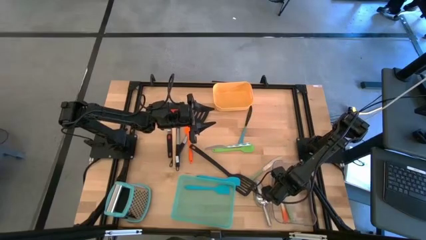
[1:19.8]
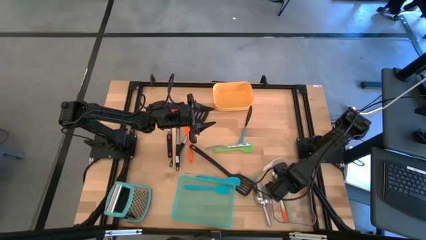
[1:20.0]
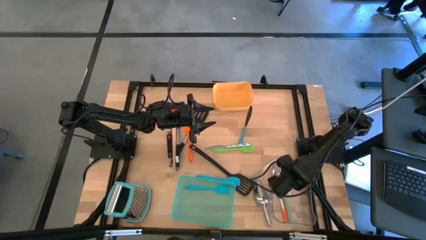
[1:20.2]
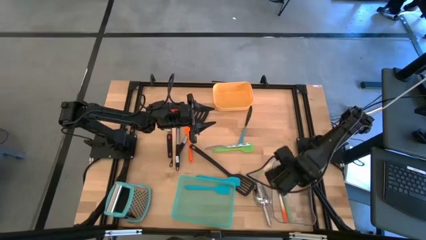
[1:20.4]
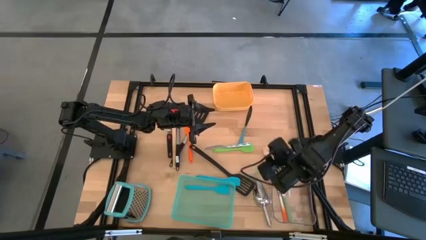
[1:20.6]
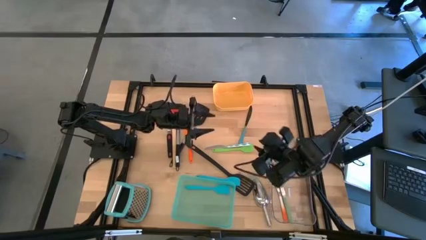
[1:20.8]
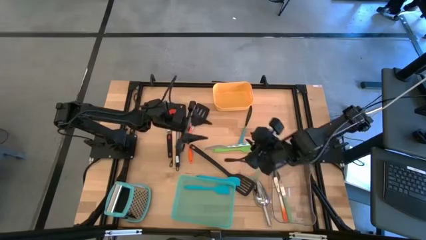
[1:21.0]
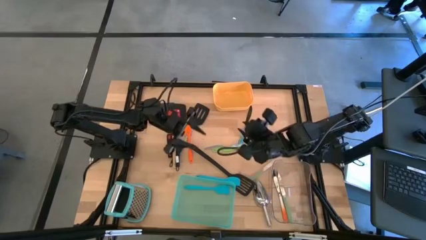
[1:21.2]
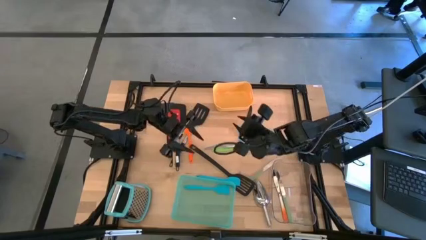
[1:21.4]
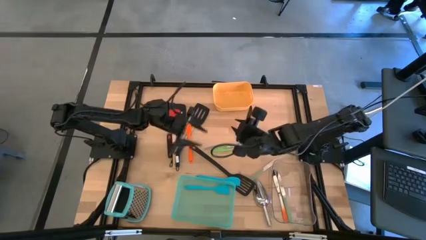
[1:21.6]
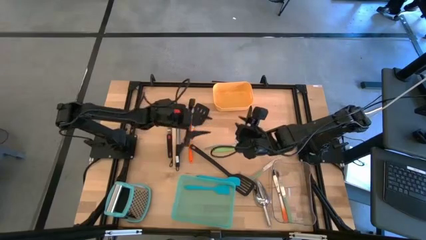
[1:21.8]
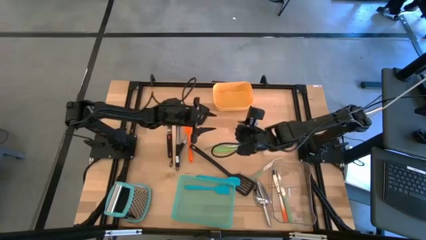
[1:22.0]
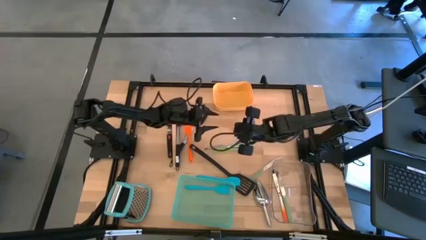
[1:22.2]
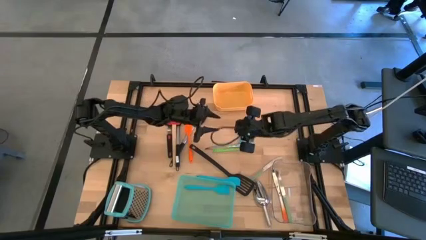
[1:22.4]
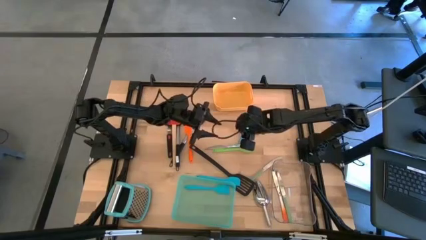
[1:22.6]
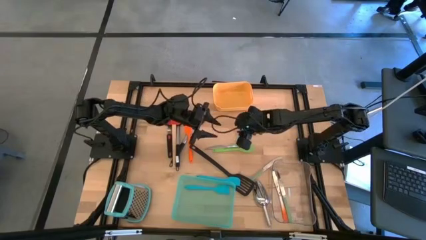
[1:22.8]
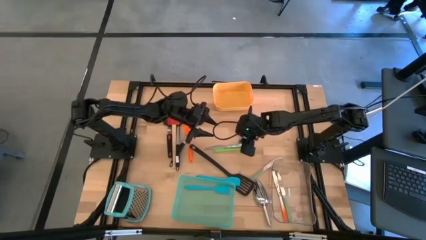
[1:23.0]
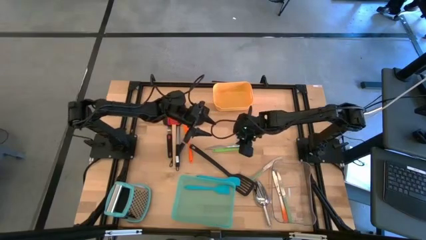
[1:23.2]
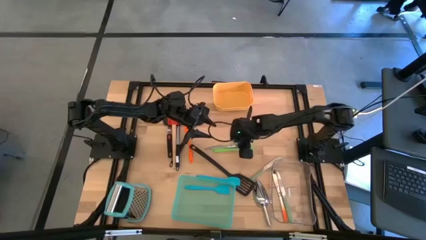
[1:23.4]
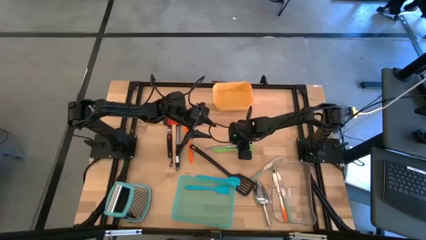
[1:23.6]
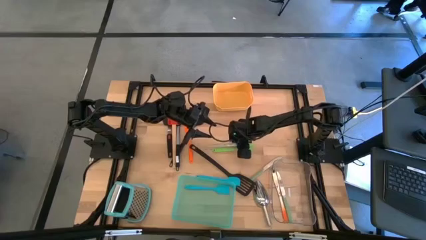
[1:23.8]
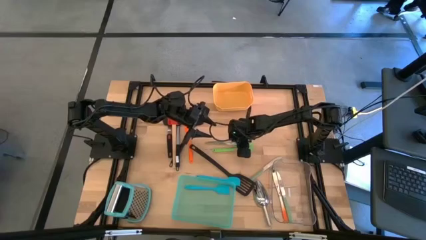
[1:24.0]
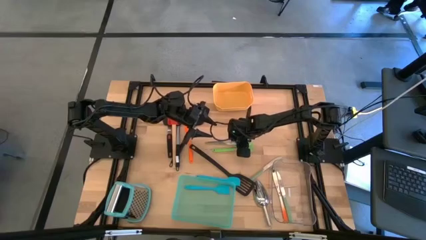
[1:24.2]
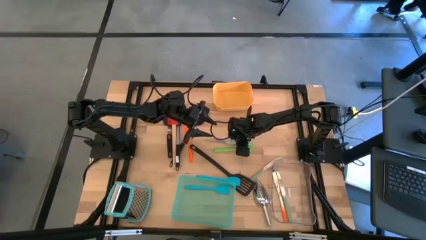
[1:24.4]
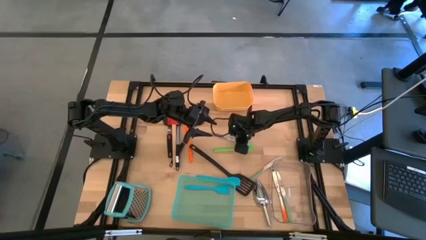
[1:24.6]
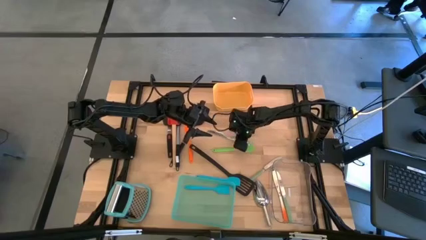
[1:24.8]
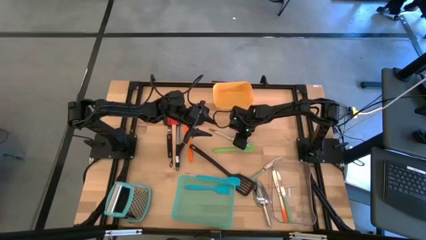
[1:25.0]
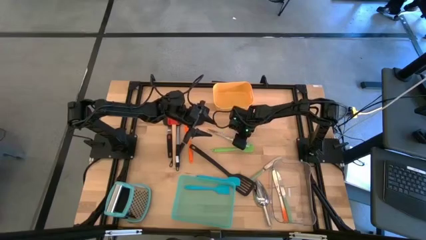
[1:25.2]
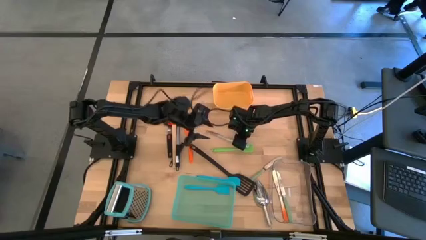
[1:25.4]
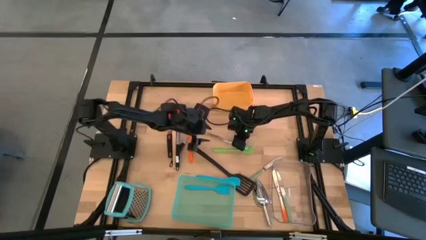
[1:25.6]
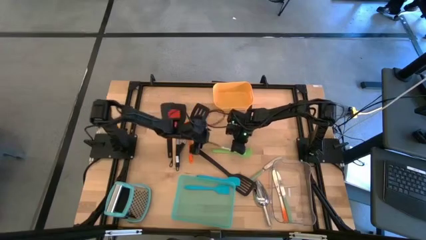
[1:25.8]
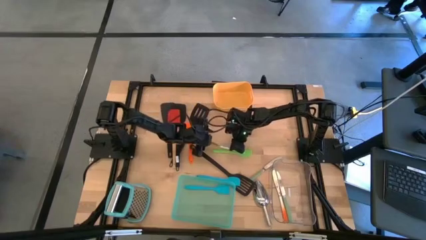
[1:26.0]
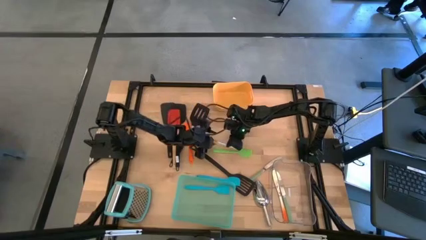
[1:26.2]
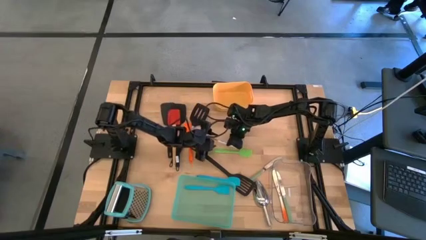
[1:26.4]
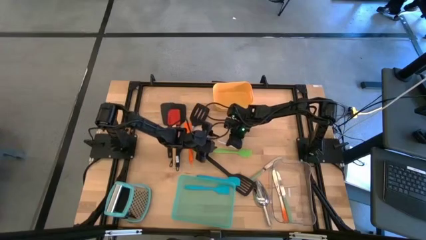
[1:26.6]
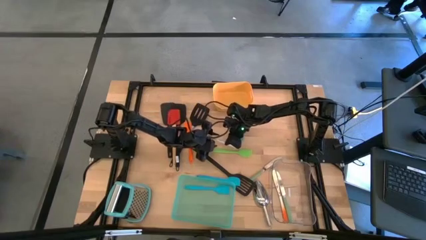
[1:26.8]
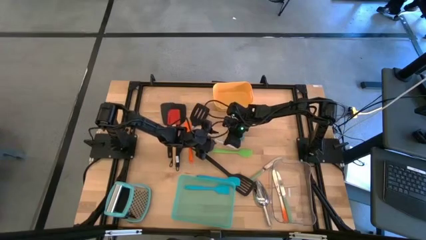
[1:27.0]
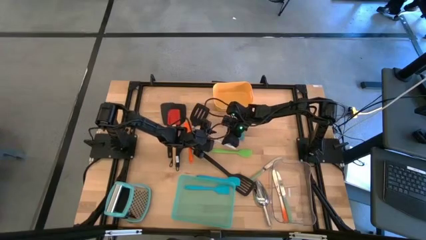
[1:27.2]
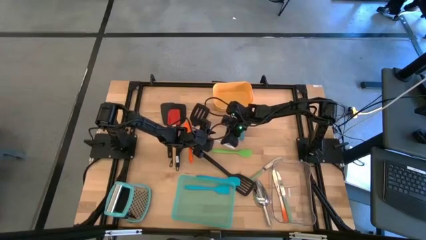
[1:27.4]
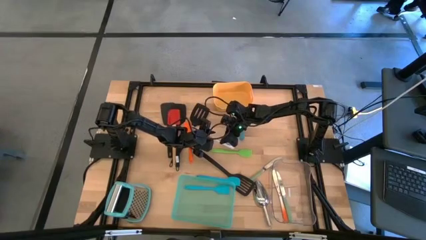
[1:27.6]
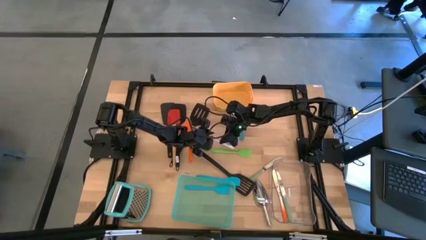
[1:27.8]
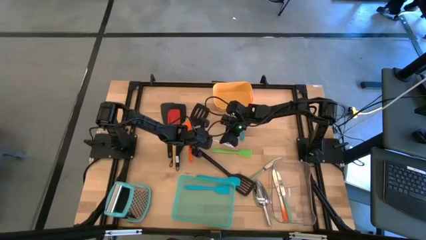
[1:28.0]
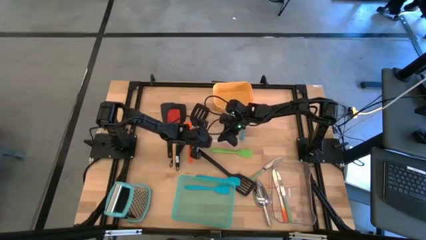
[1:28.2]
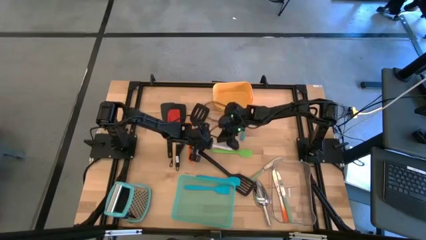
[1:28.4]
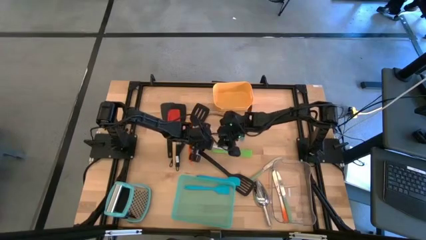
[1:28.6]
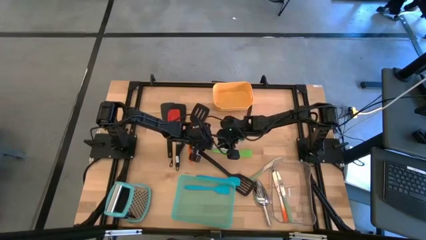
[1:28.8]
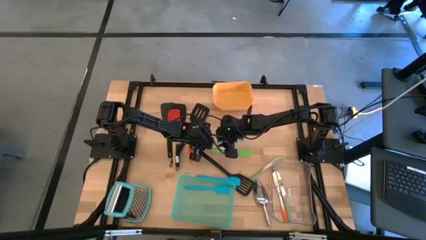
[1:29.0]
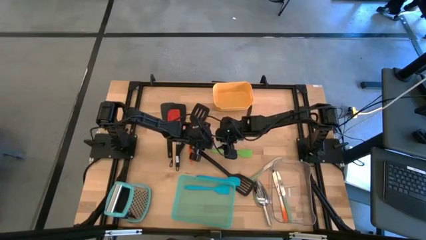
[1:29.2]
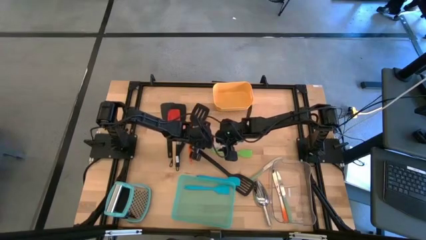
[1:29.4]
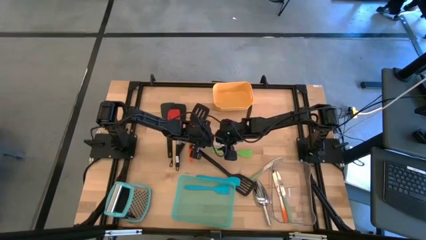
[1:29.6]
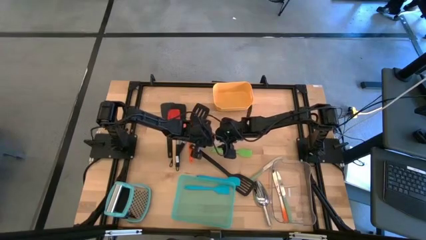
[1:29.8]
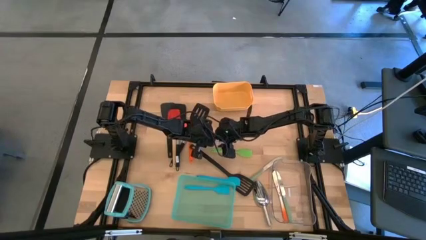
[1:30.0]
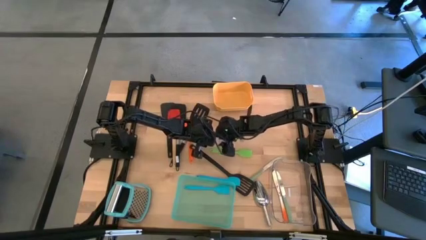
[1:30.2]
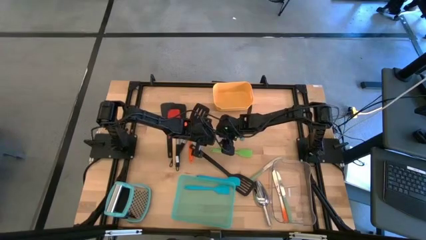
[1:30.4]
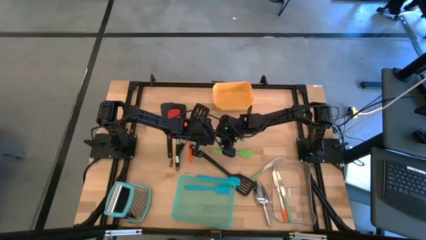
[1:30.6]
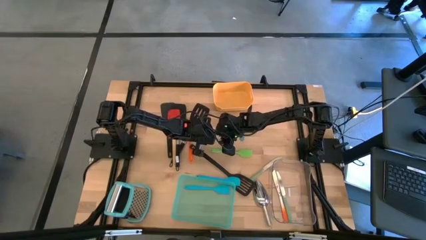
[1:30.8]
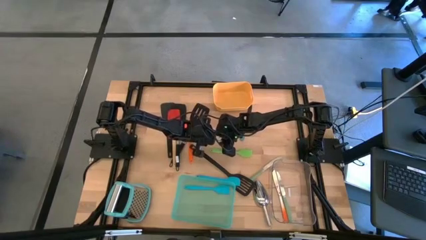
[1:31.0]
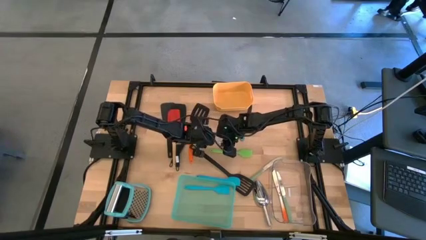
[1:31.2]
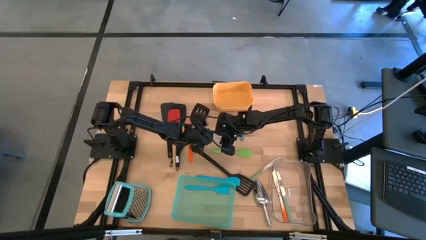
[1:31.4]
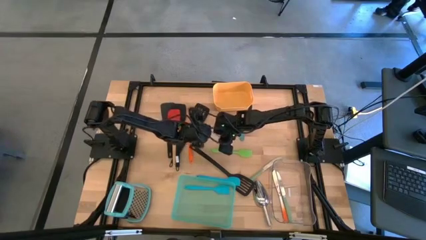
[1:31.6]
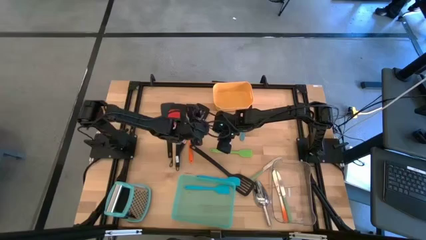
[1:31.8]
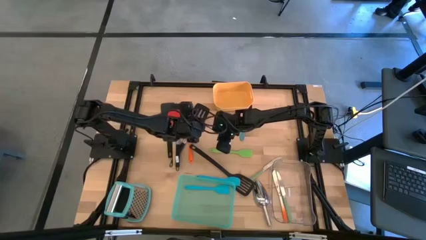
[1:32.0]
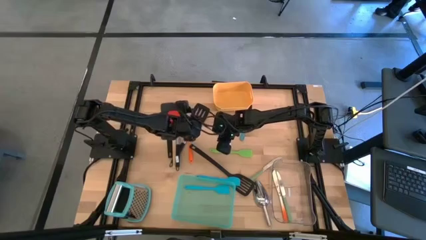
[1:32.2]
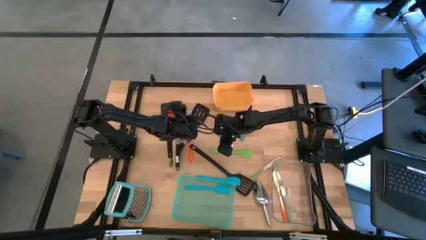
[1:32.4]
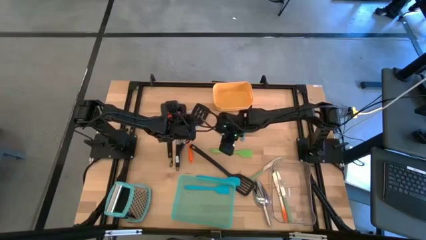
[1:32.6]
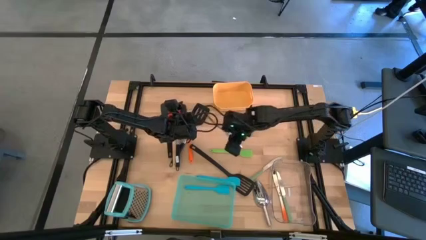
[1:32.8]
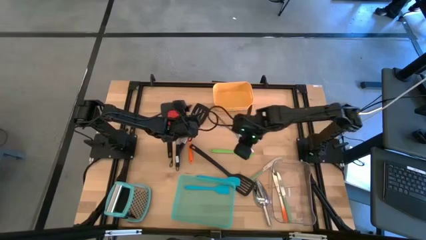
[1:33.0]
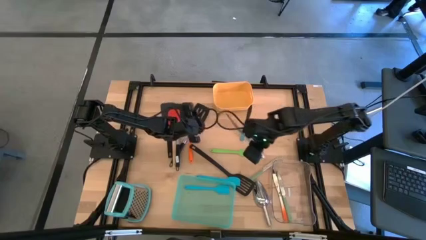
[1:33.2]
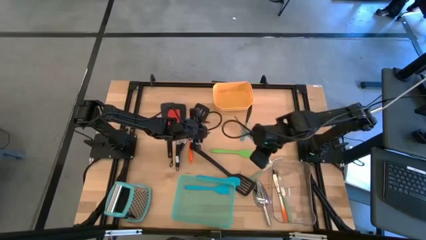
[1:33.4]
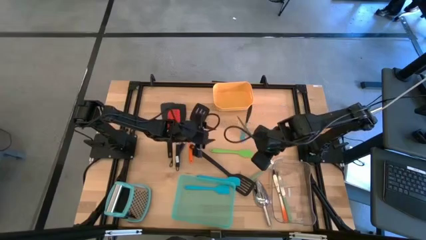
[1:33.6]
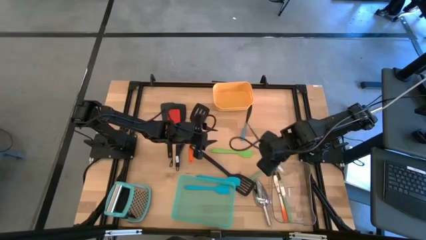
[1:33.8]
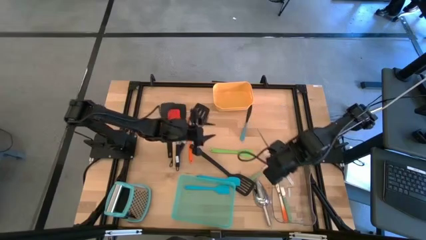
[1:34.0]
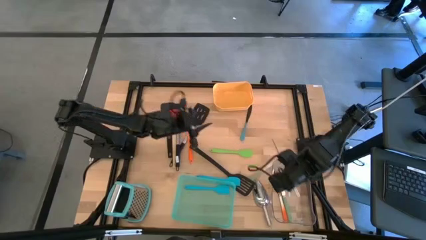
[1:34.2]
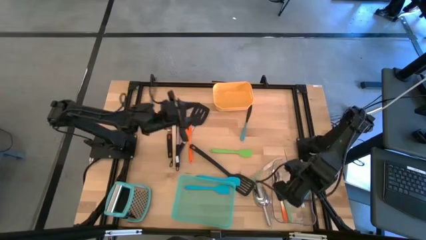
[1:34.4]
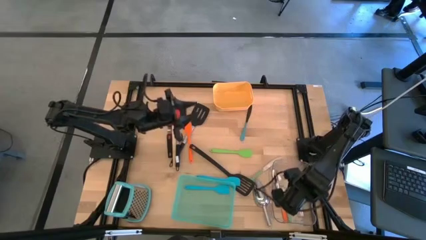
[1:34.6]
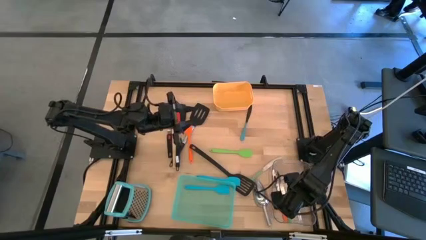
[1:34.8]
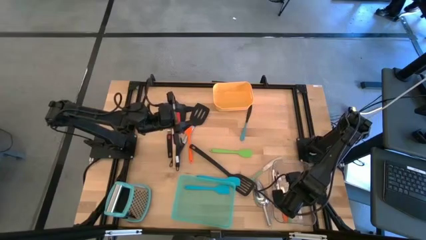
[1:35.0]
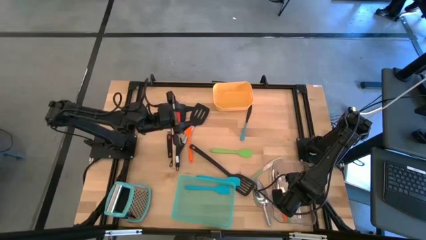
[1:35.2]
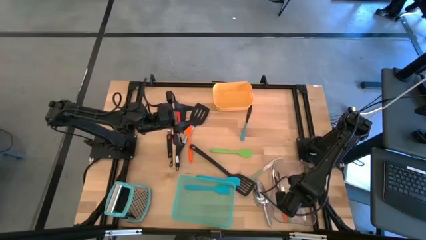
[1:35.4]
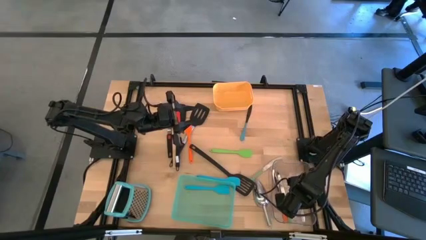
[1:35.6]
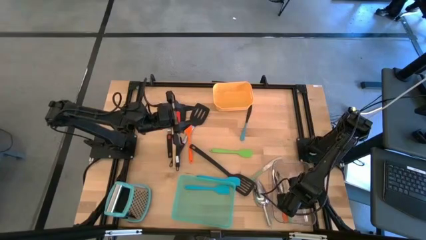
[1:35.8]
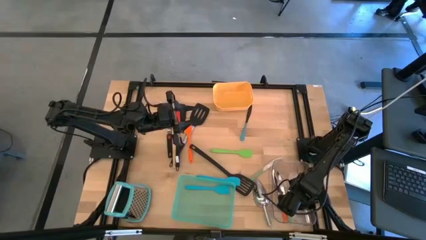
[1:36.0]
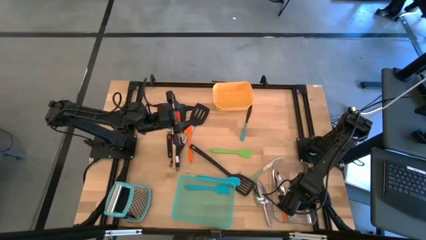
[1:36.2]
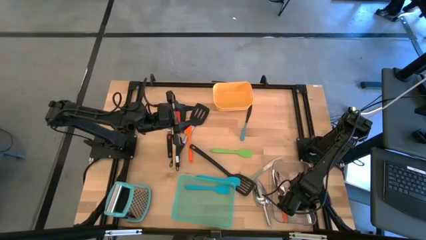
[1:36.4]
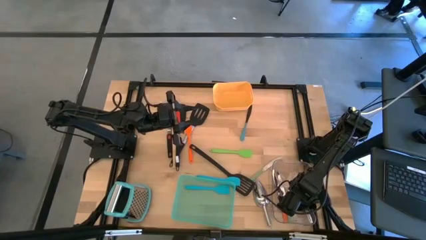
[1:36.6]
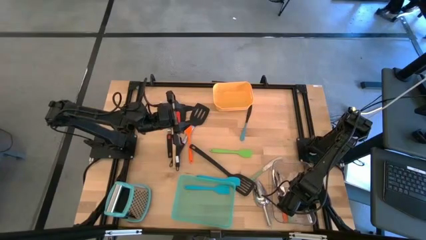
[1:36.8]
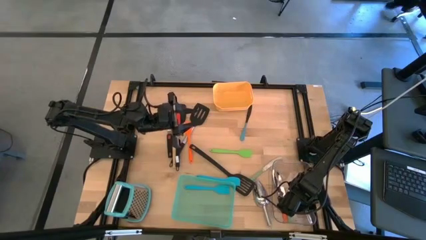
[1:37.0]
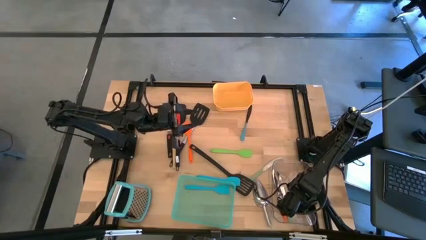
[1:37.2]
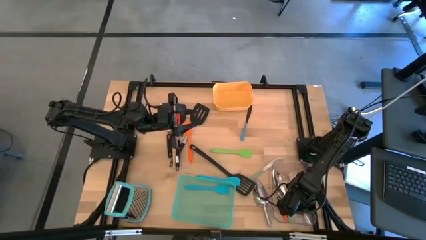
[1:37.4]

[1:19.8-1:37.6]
Task: Pick & Place Kitchen Items
Put the blue patterned table knife into the transparent bin
